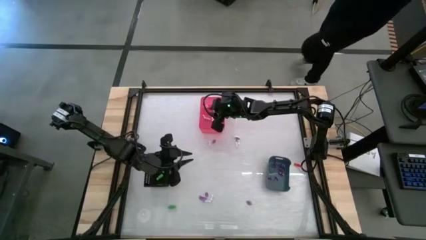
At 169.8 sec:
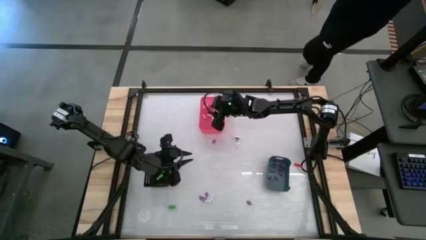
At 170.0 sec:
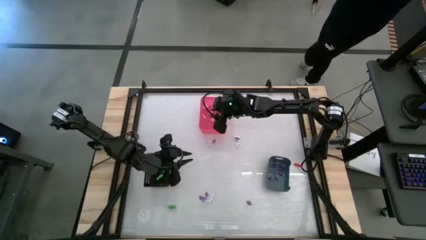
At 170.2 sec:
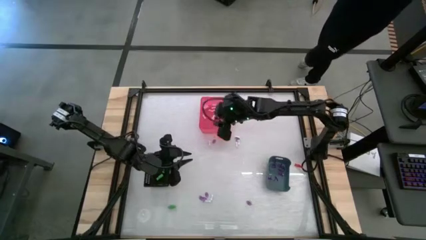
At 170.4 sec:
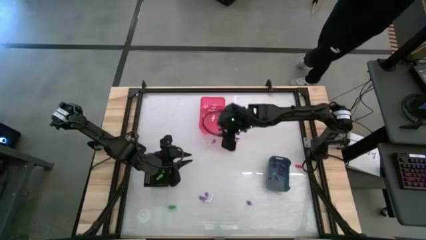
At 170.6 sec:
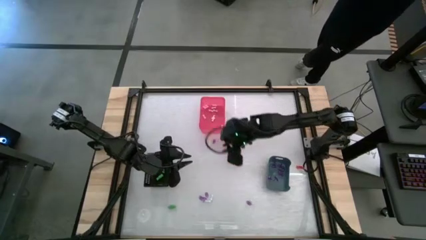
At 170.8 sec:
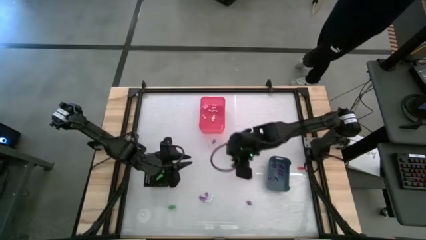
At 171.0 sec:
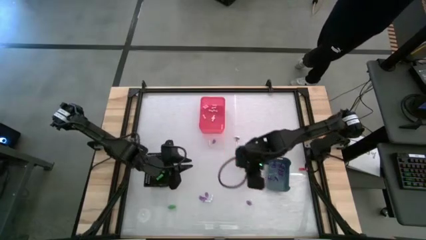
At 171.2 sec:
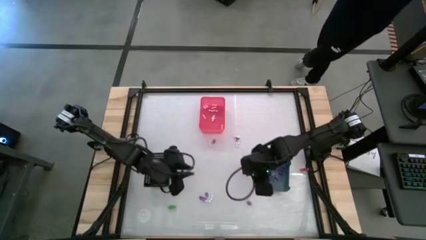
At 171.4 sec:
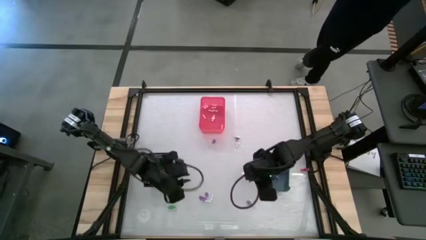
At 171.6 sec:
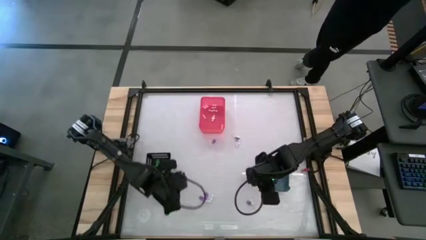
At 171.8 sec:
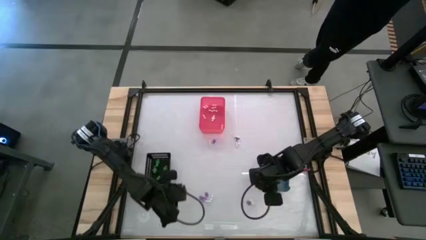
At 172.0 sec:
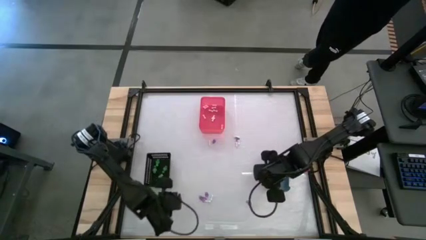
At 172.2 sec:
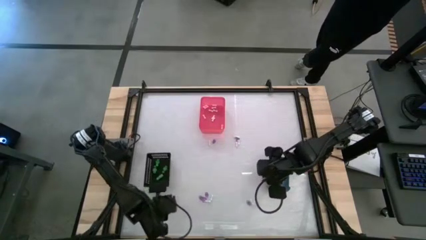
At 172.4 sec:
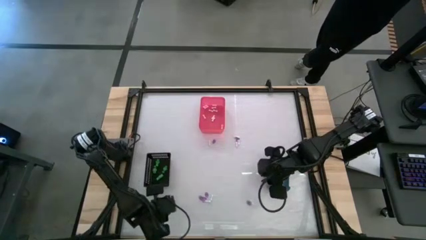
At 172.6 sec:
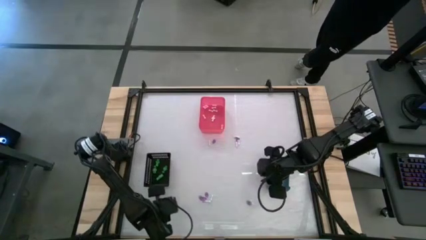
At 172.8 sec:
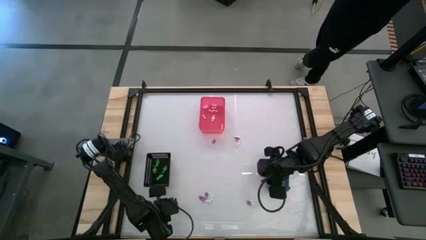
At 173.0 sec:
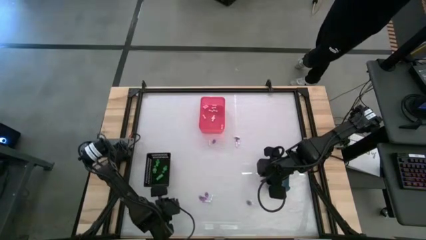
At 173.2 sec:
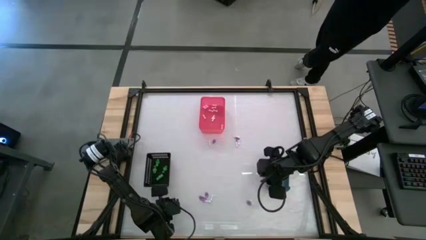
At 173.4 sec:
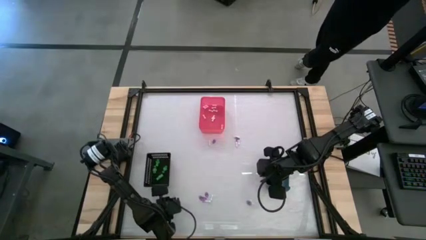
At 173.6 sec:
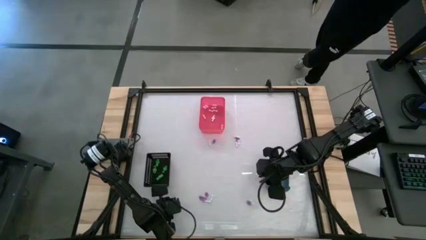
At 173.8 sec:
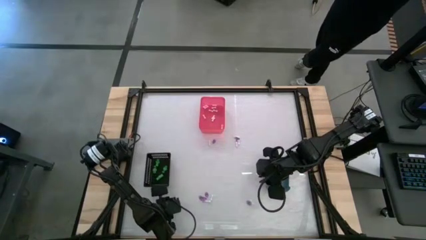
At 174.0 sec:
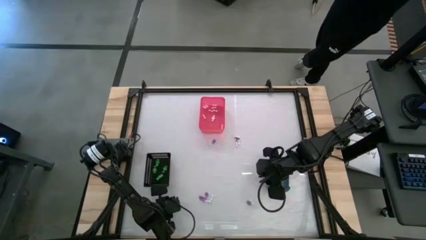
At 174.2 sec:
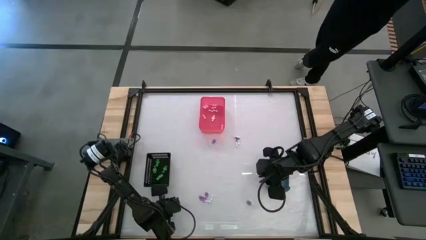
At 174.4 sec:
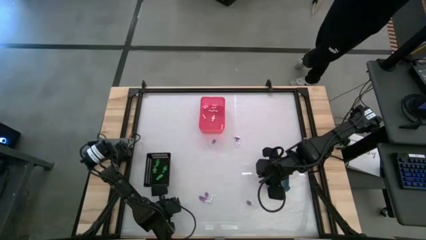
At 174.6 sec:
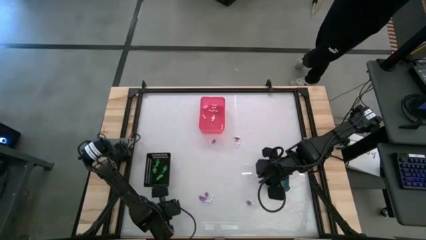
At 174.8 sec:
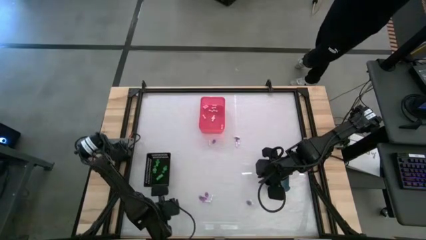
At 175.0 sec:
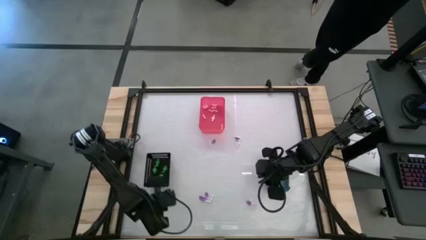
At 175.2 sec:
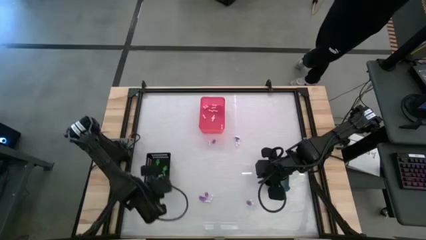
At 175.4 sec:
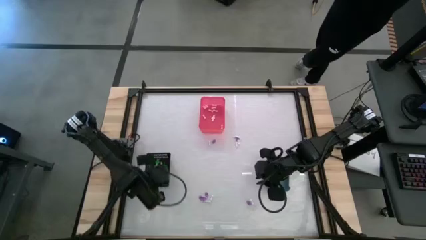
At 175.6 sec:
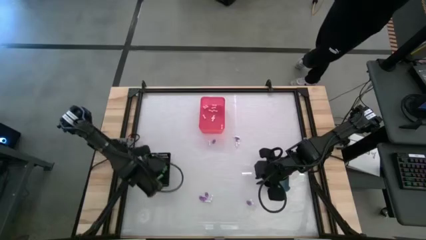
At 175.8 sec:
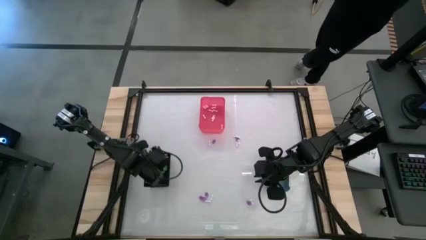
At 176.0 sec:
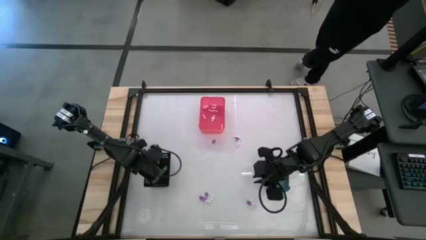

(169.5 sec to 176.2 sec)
Task: Sort Halloween decoration
Put the skeleton toy into the black basket

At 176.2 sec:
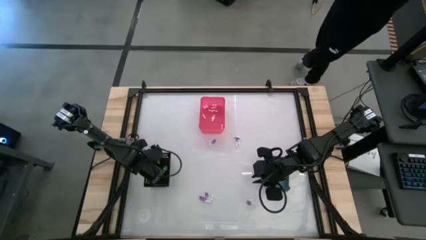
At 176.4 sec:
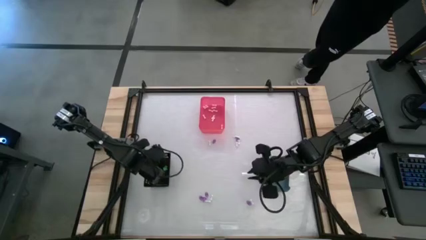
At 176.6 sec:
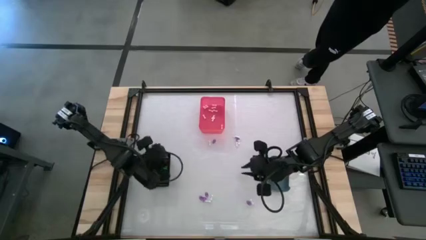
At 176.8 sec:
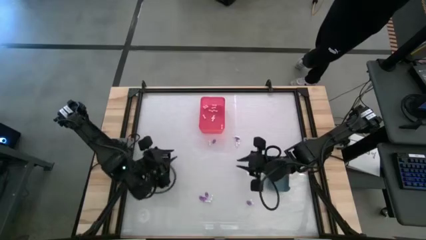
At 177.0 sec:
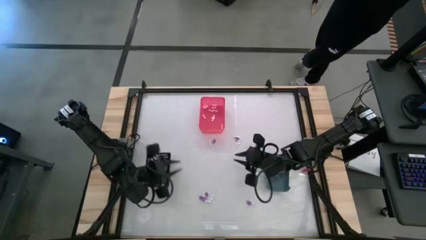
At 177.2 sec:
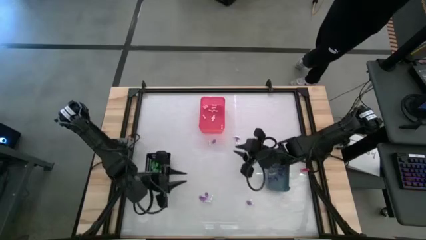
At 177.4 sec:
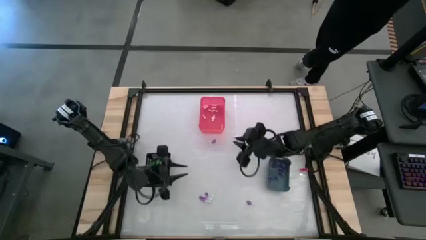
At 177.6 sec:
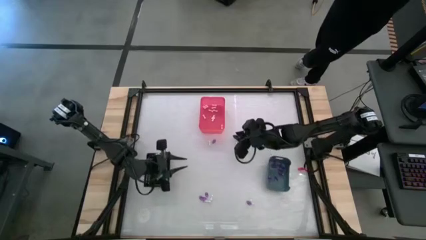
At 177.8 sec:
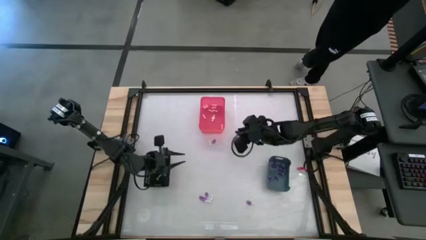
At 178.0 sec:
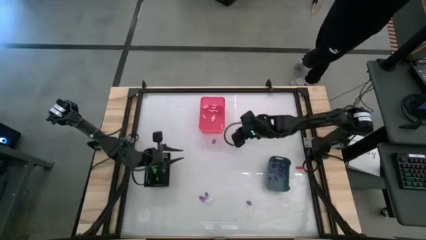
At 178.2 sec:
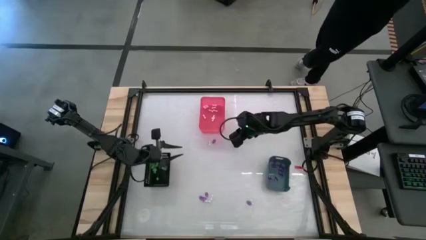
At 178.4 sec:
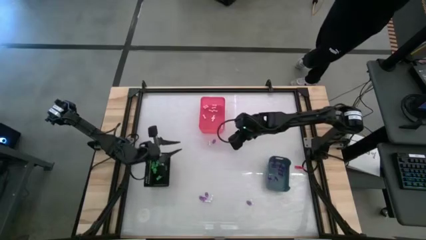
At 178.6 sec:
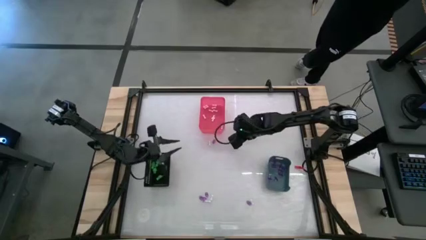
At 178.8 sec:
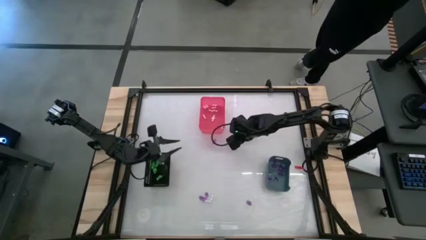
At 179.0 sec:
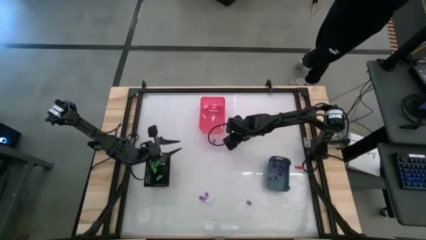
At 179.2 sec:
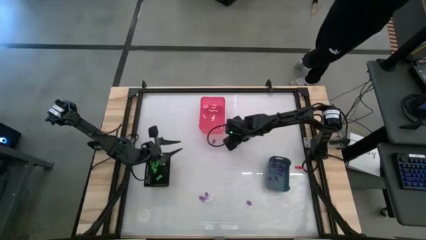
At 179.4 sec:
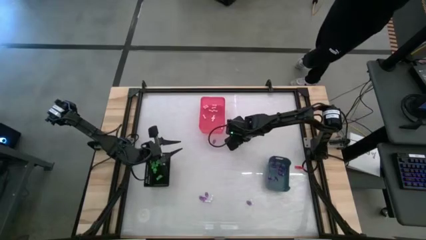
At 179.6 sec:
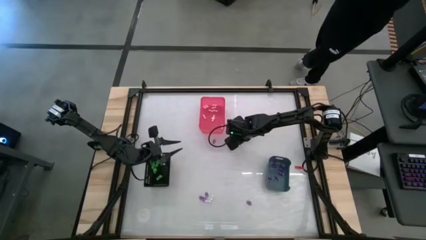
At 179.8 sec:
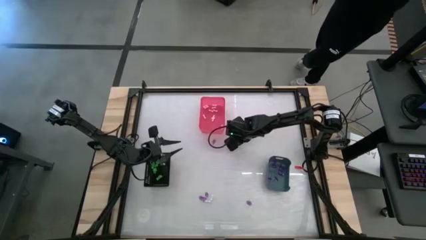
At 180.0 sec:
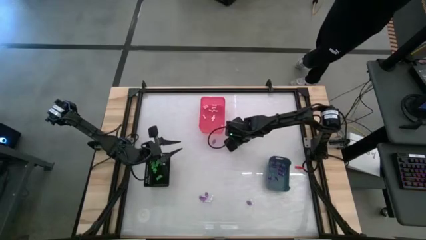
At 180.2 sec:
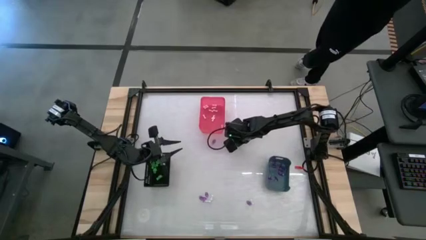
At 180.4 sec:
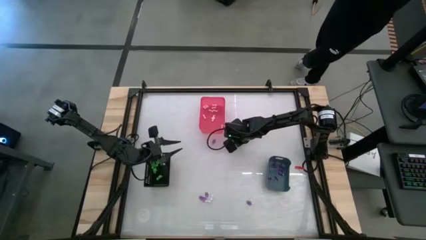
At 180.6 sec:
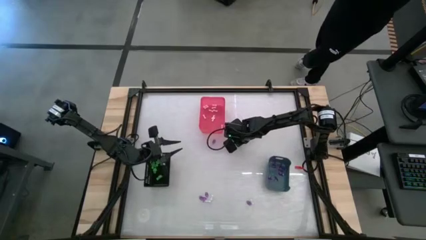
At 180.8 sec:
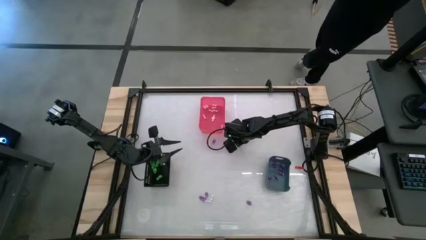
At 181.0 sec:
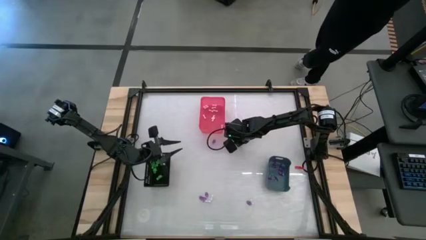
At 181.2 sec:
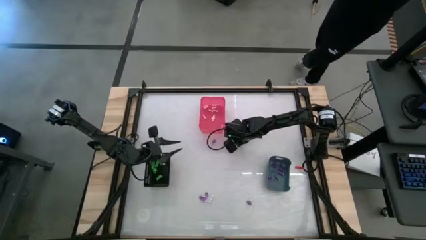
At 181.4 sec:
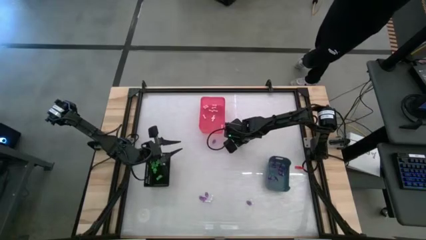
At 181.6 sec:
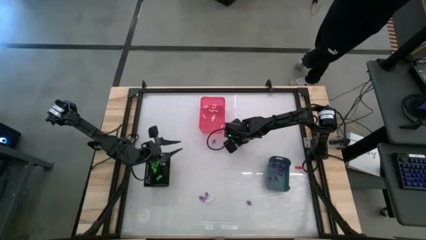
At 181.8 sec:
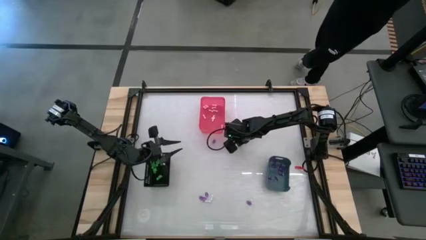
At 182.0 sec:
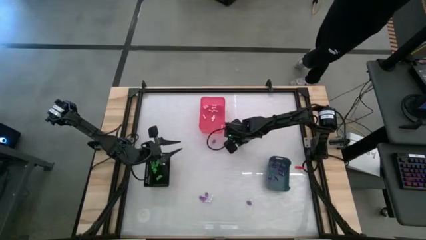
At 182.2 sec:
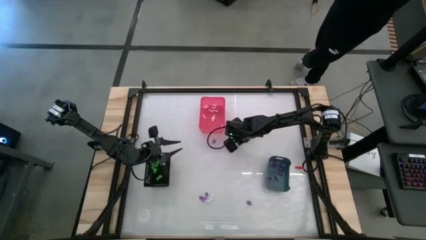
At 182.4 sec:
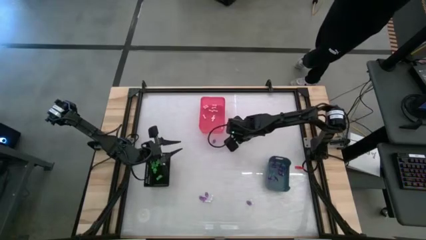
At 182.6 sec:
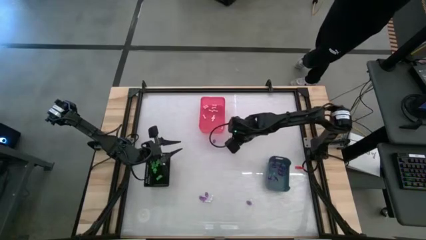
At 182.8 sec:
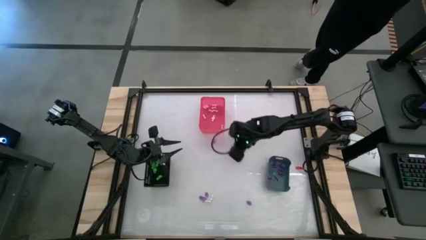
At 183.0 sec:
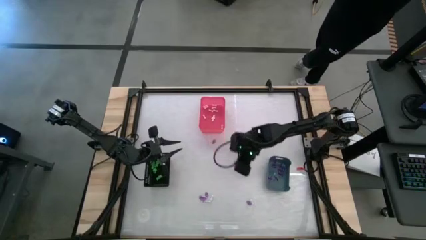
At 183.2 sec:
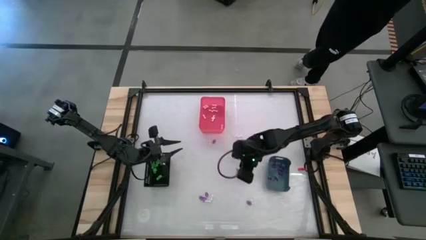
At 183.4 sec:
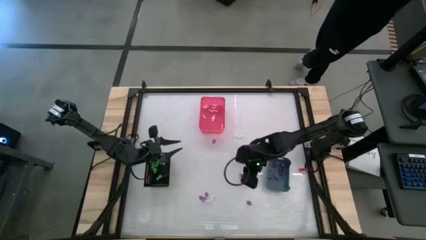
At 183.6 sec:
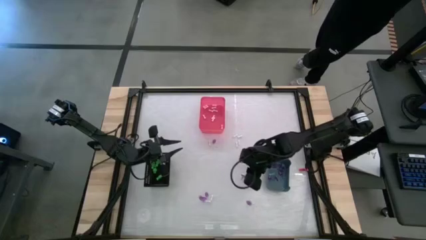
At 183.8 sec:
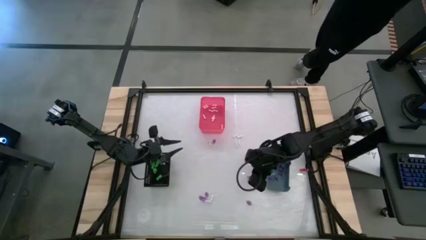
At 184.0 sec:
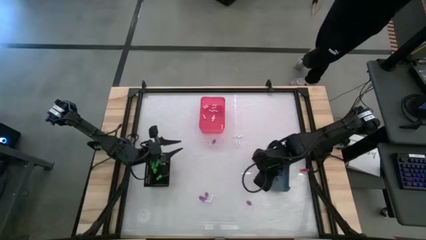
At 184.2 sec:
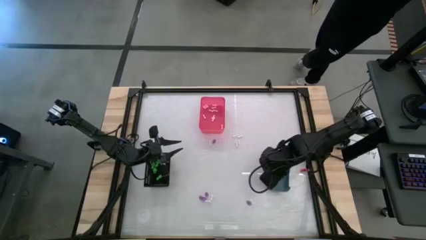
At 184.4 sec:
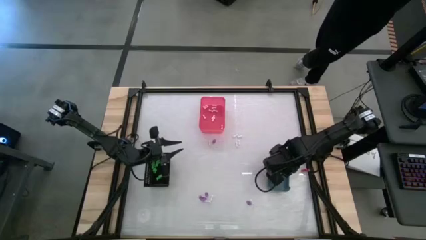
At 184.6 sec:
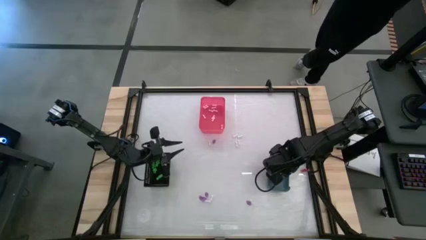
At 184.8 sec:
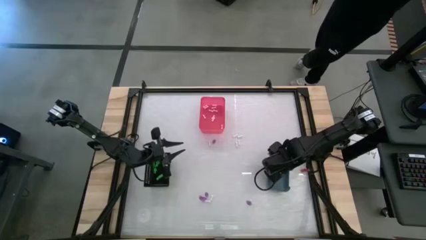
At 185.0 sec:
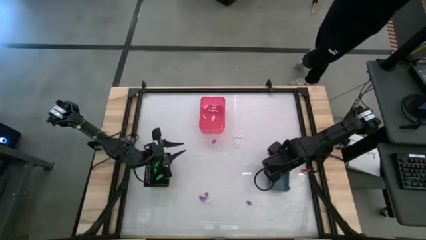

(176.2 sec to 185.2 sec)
Put the witch hat toy into the blue bin

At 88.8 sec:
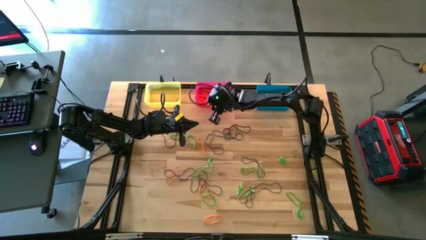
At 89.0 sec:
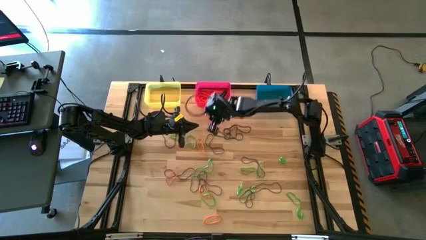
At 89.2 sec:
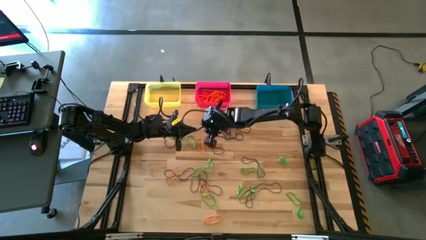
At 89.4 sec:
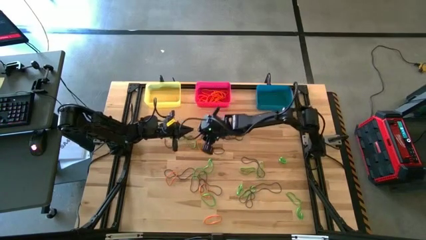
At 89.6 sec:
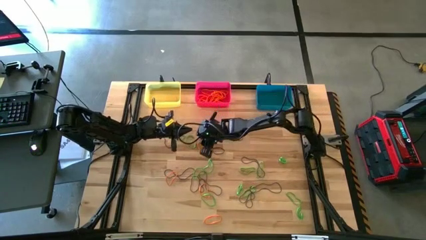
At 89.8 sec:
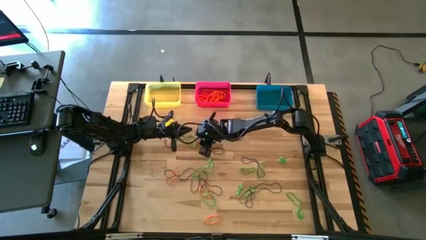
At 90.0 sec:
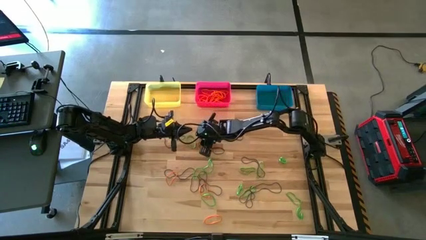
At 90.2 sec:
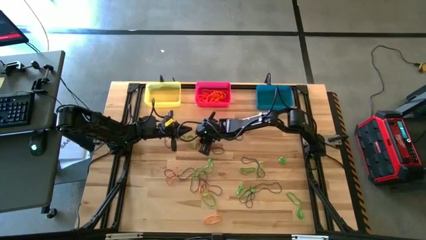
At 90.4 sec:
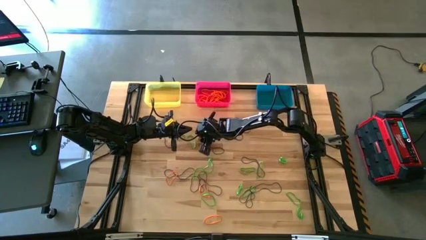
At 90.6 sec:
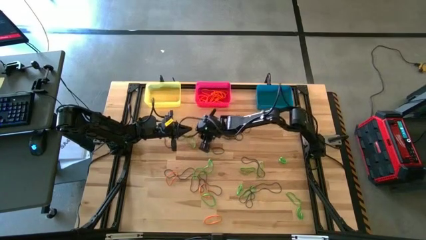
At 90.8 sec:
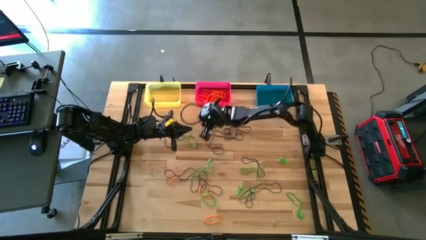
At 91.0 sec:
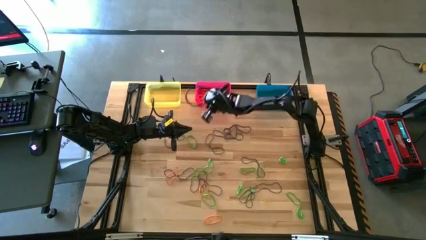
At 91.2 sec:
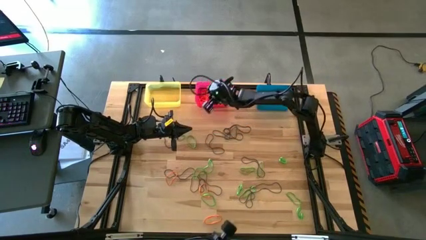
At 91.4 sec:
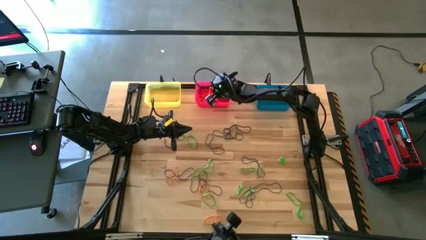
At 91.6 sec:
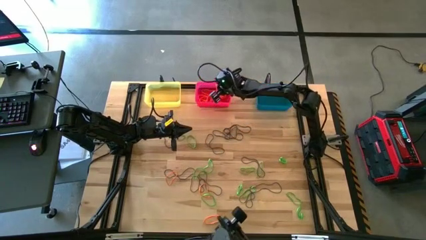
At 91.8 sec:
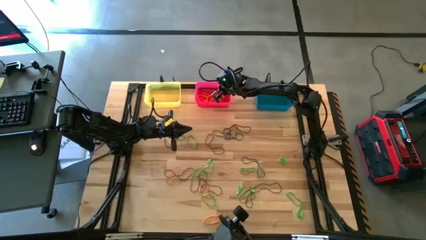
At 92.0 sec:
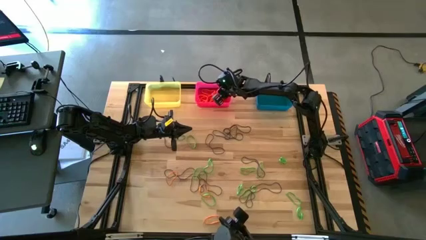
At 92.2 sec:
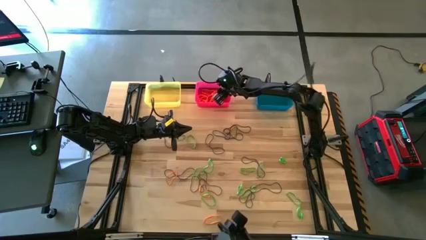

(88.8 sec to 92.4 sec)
Task: Sort rubber bands into baskets
Put the orange rubber band into the pink bin
